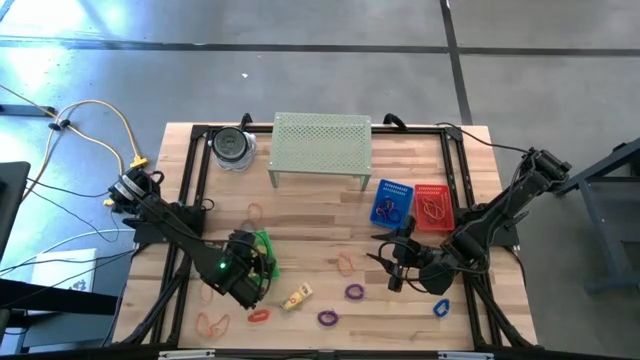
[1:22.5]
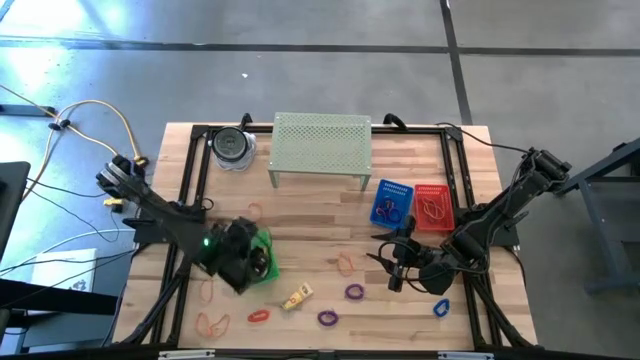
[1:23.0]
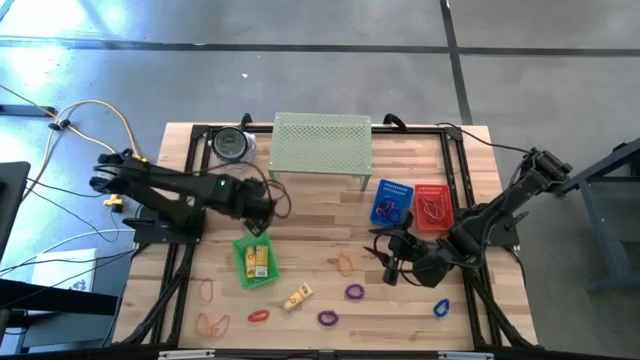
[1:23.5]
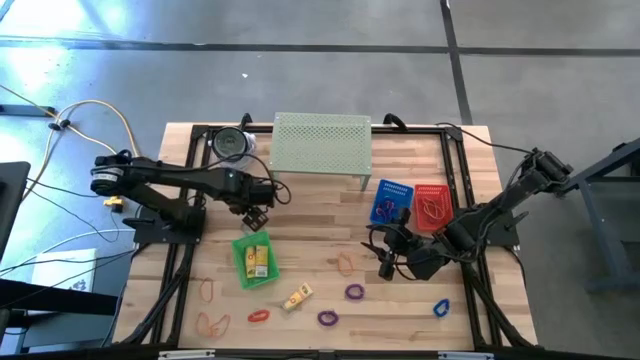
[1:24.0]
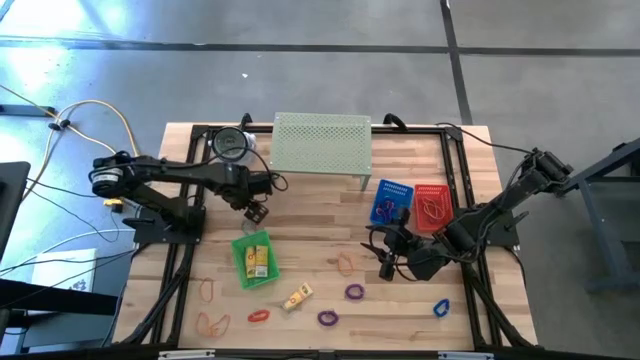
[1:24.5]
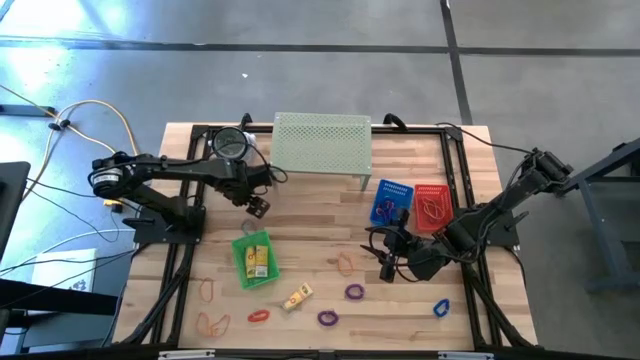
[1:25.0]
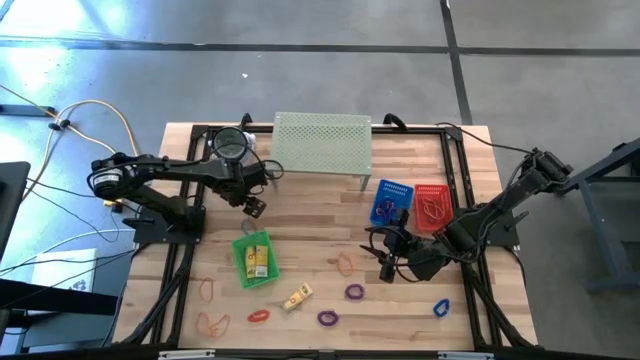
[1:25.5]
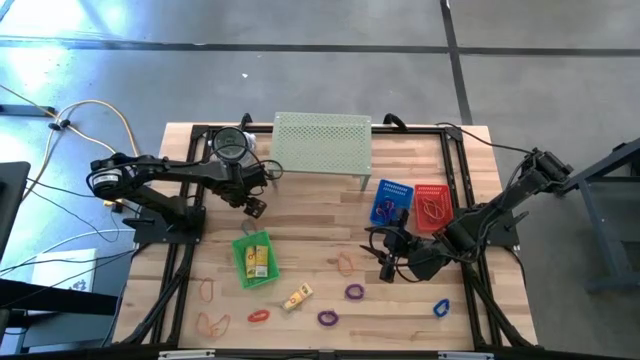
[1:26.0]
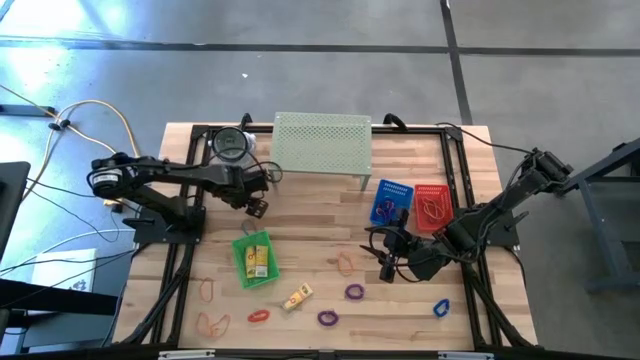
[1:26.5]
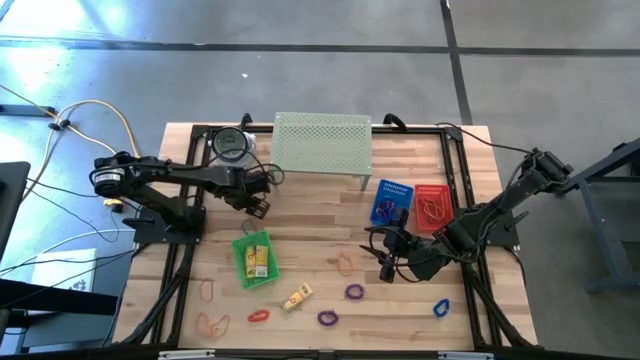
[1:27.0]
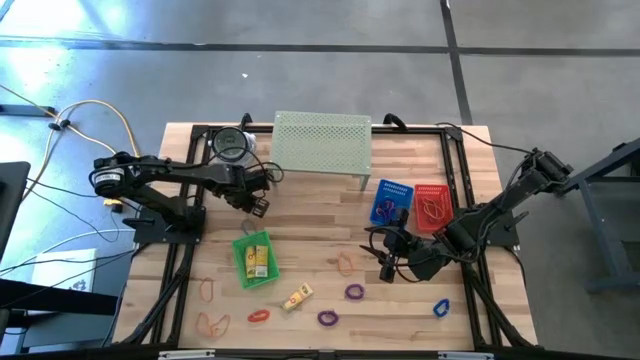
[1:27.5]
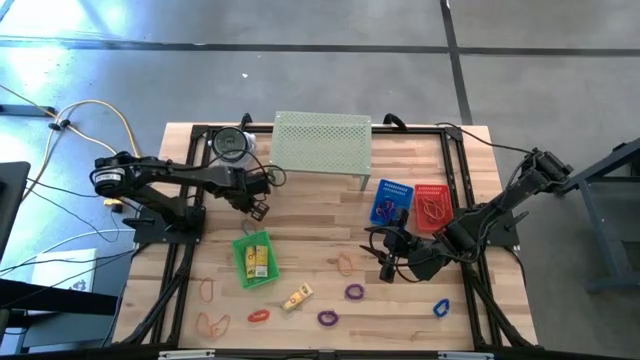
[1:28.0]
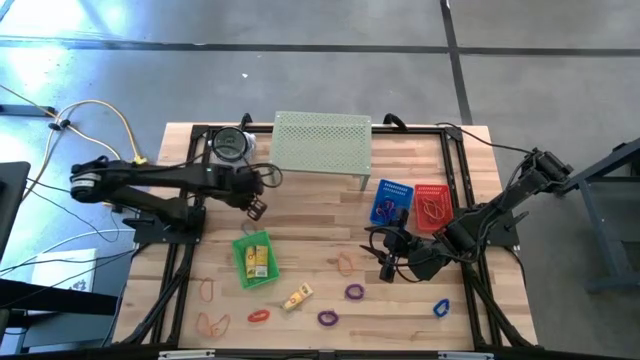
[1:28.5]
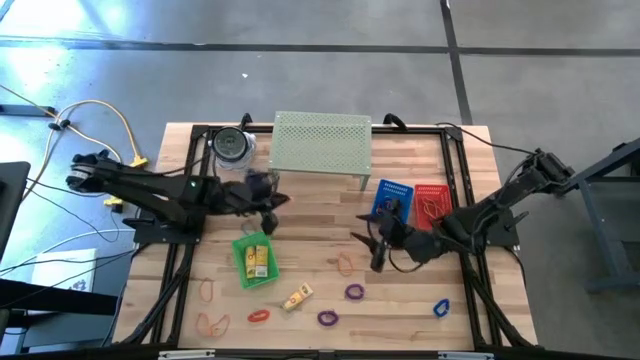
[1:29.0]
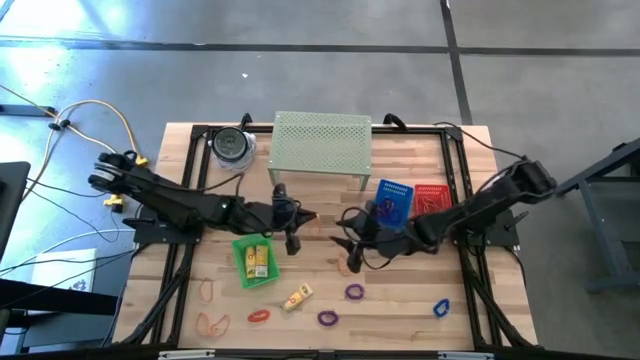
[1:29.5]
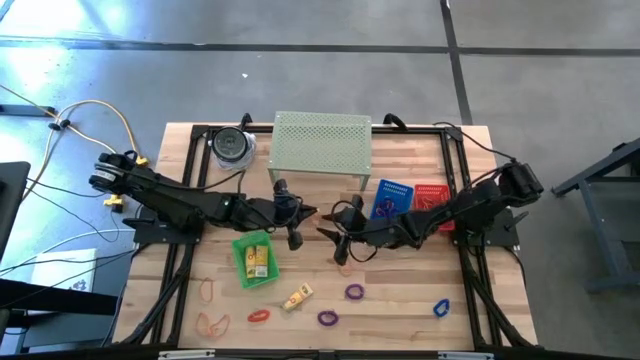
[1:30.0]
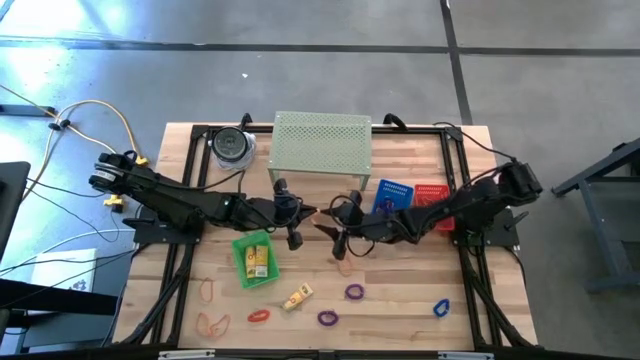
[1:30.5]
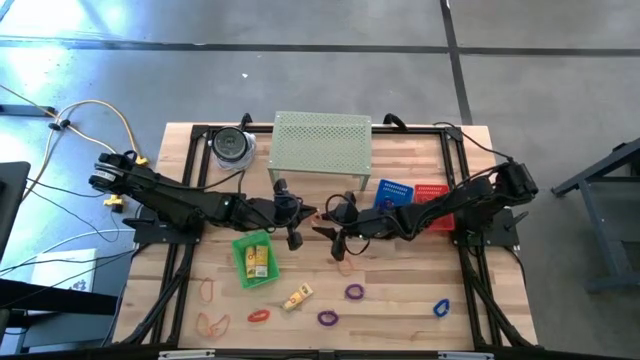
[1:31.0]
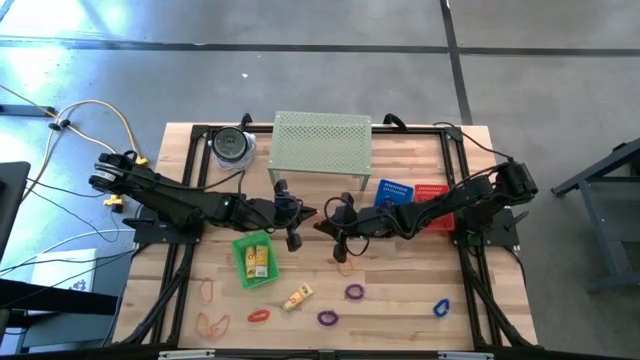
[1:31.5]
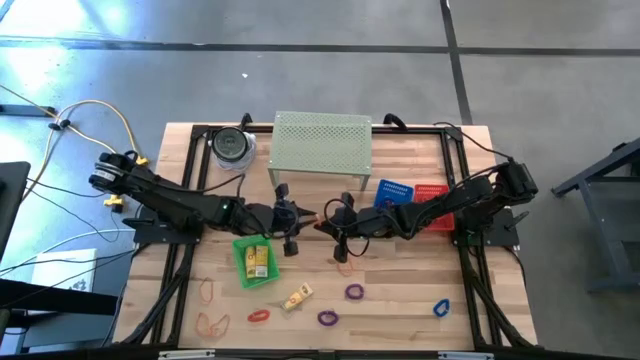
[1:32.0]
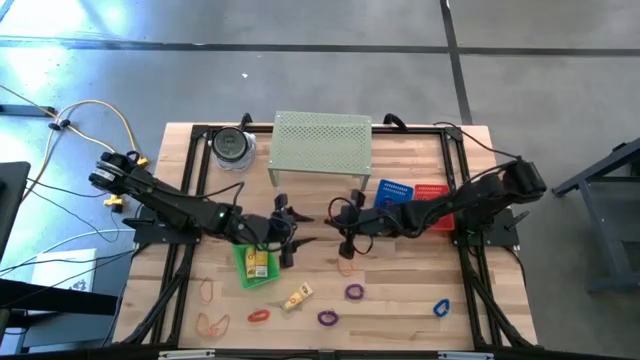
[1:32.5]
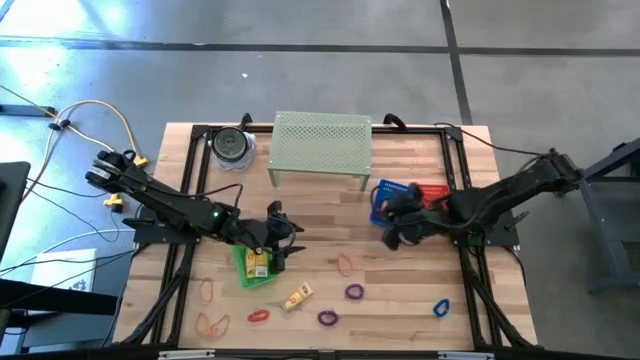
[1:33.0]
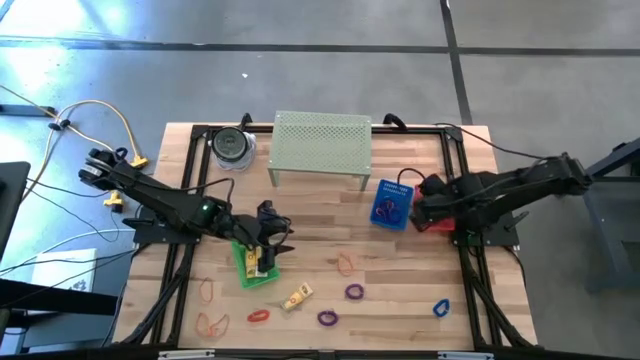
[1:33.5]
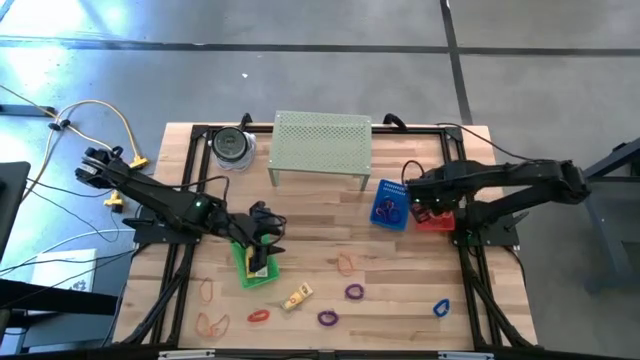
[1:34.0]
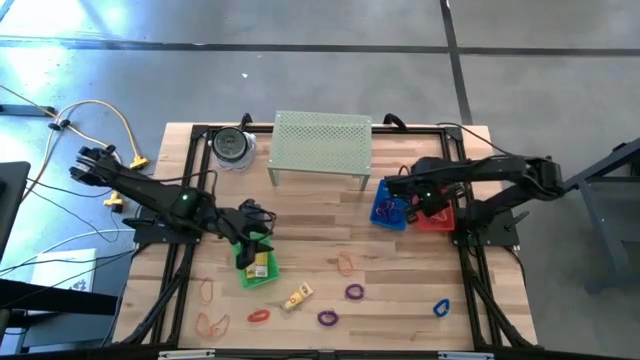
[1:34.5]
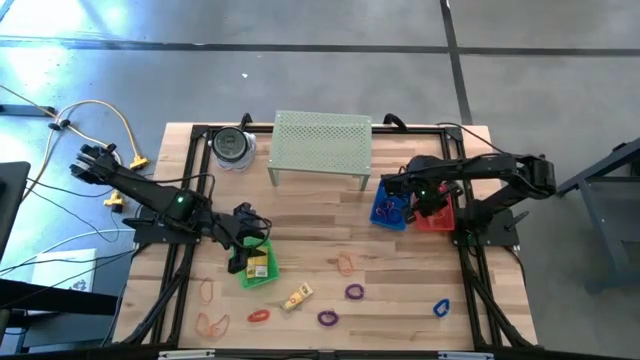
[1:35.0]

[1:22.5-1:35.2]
Task: Pick & Place Office Desk Supplies
Put the orange rubber band into the red bin

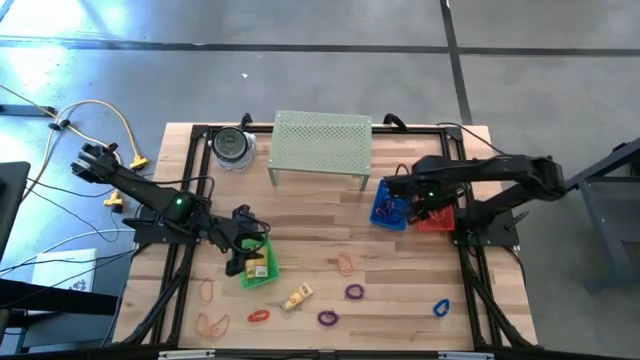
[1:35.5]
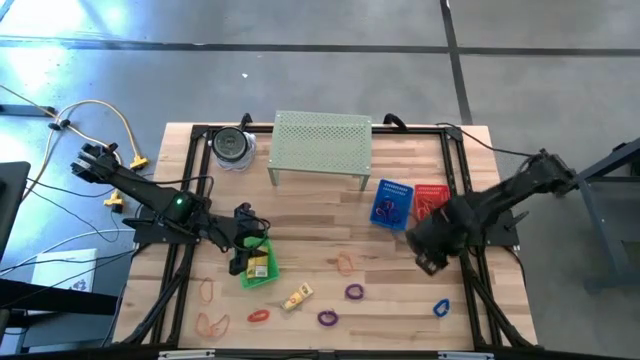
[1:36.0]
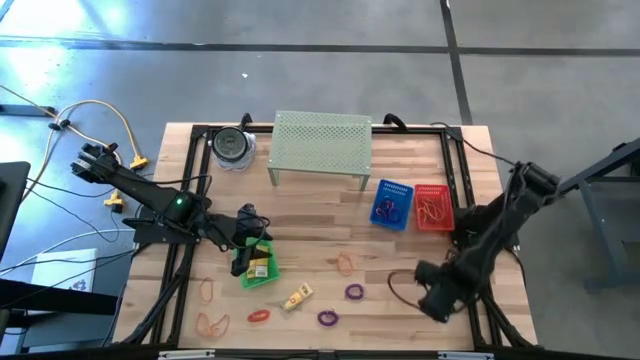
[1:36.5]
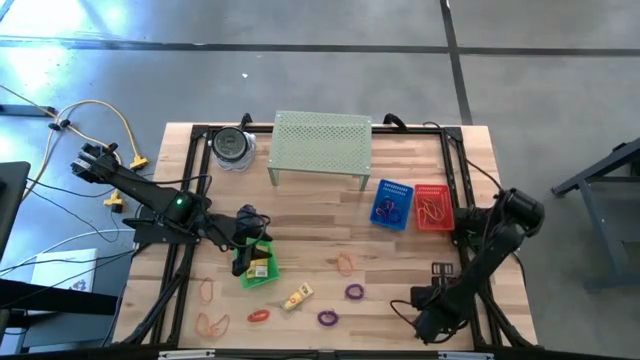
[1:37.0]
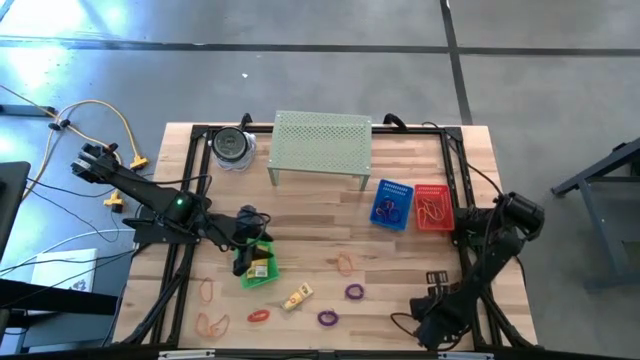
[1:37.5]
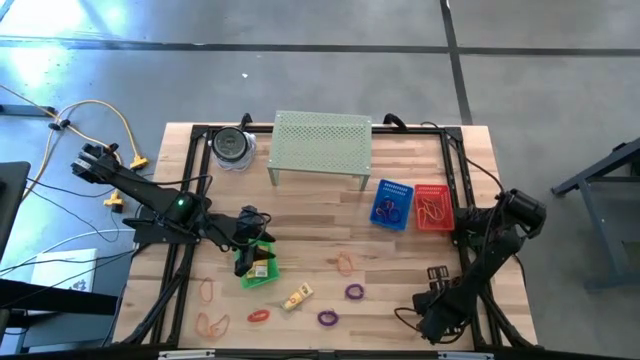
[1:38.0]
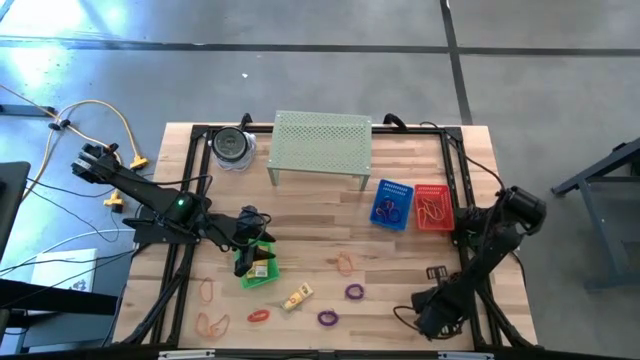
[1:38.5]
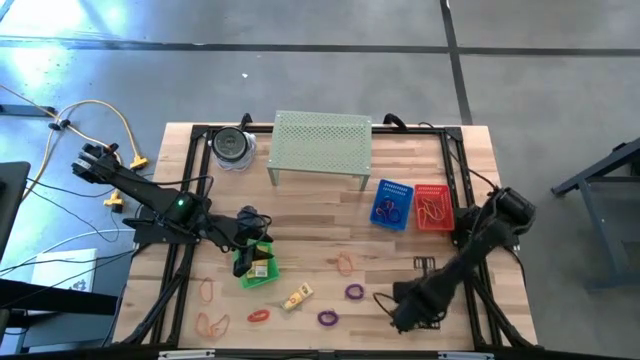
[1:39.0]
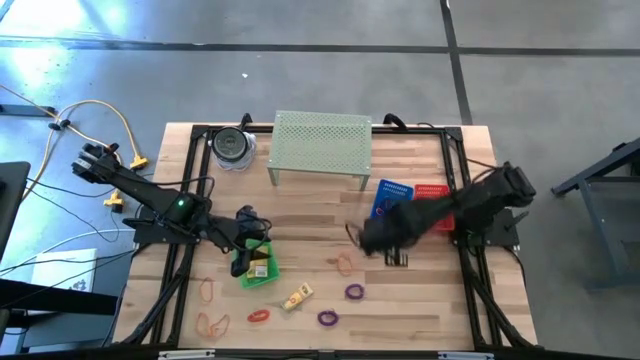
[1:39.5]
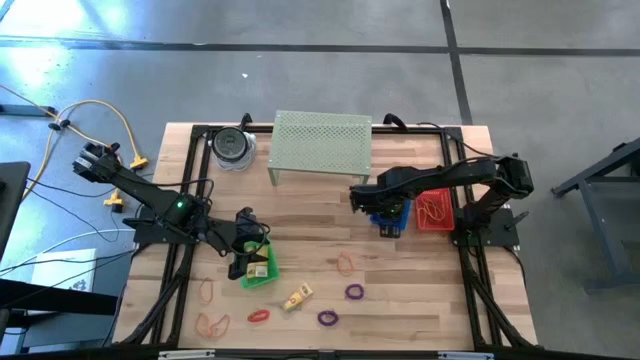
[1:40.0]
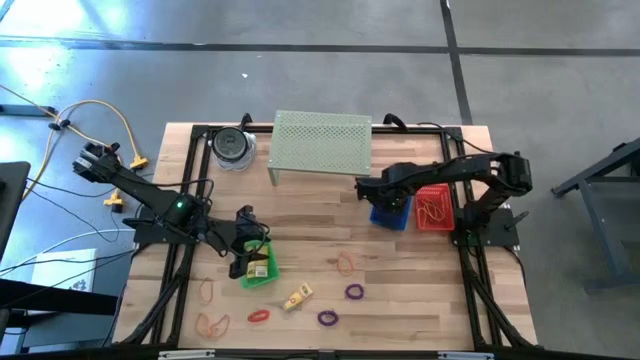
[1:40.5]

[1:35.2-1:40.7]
Put the blue spring keychain into the blue bin

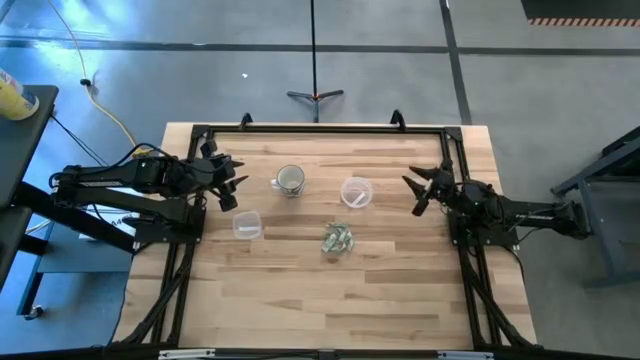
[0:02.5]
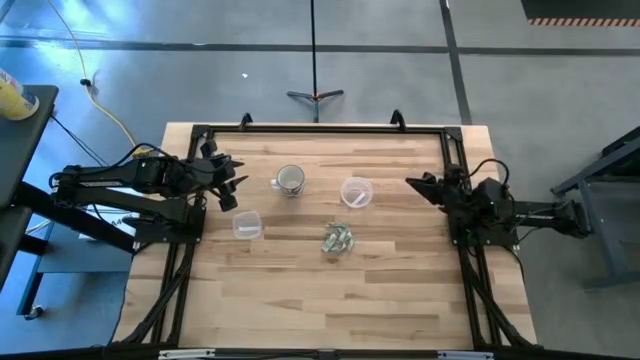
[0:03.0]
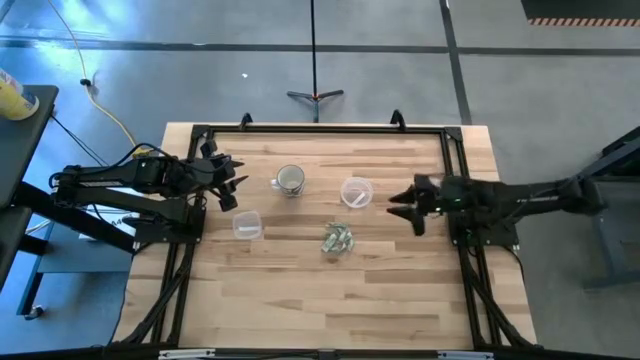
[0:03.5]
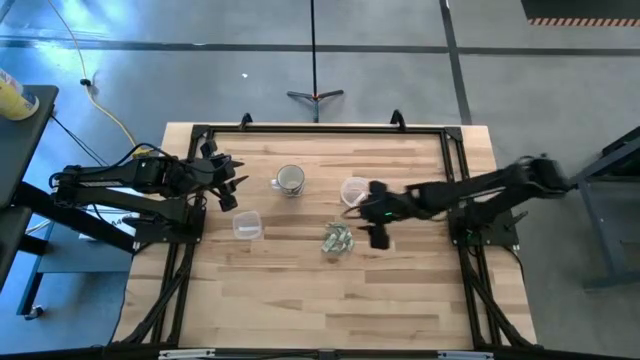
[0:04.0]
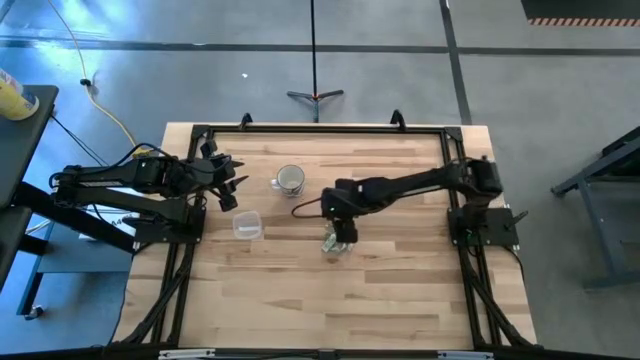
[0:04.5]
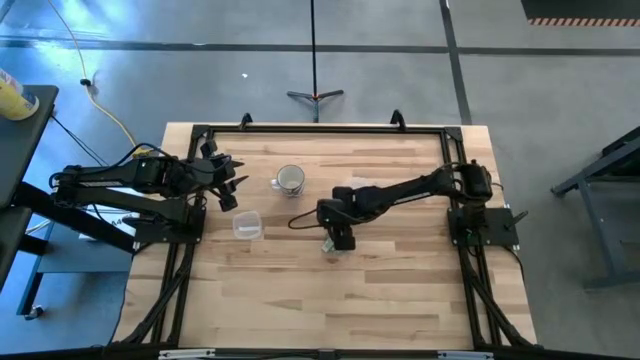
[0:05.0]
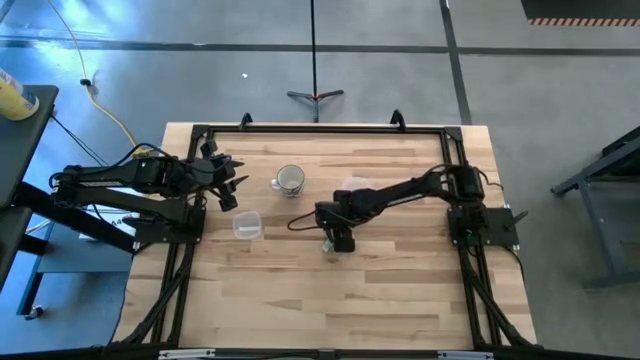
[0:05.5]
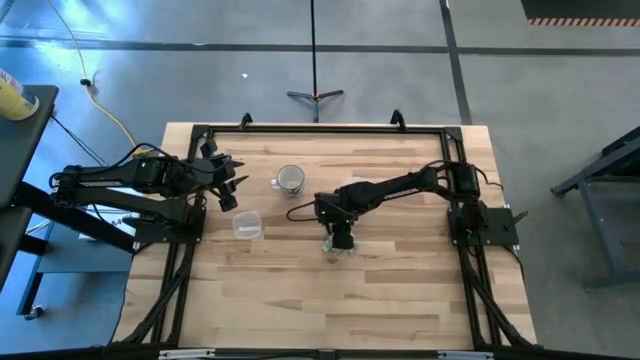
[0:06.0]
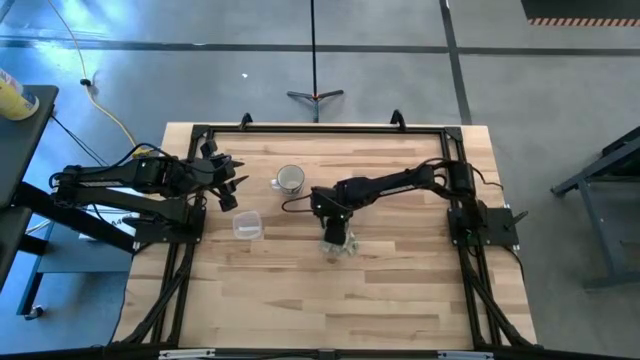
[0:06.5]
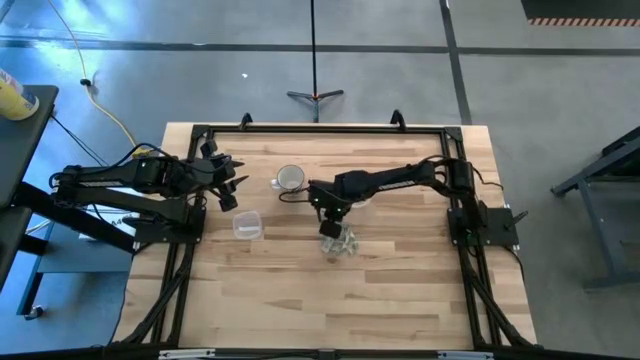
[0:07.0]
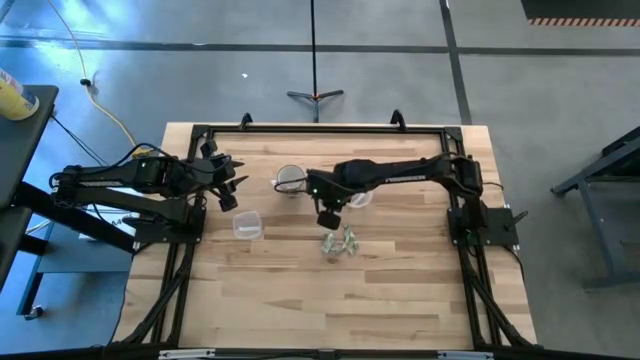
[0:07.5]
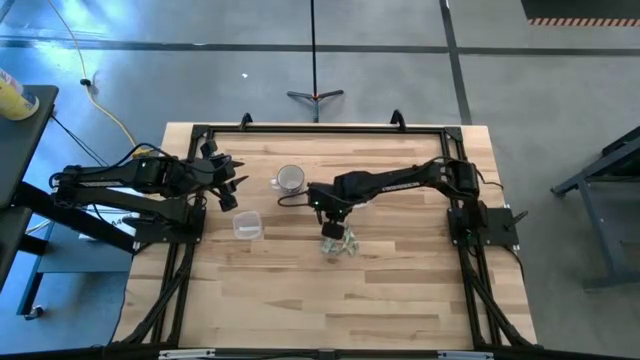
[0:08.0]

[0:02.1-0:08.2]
Task: Pick and place Stevia / Truvia into bins
Put the white stevia packet into the transparent container
